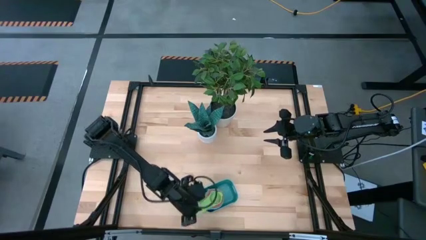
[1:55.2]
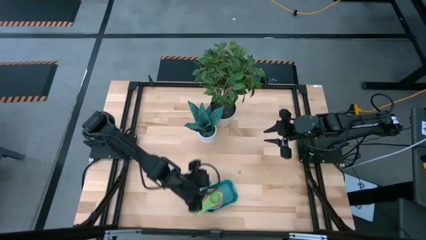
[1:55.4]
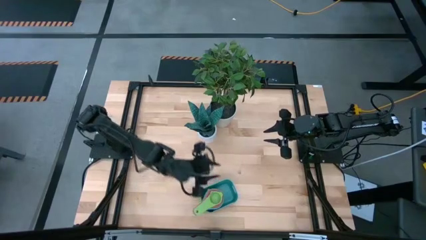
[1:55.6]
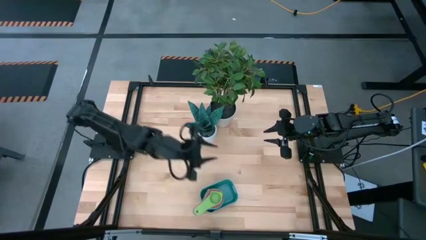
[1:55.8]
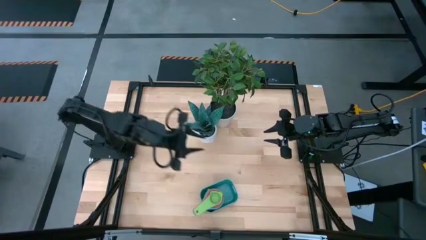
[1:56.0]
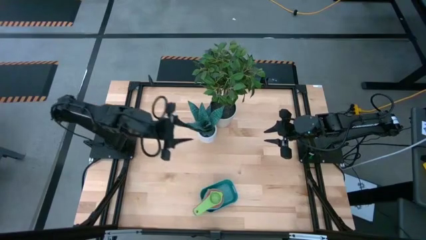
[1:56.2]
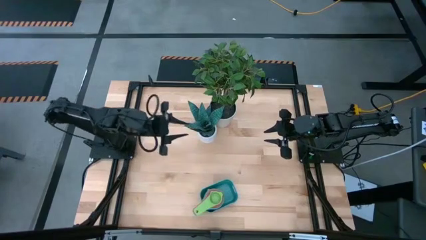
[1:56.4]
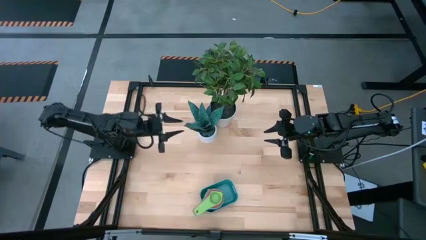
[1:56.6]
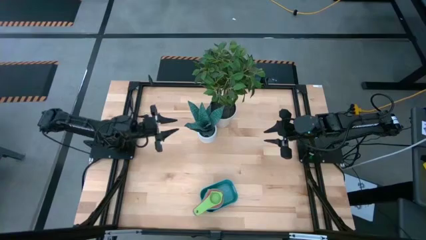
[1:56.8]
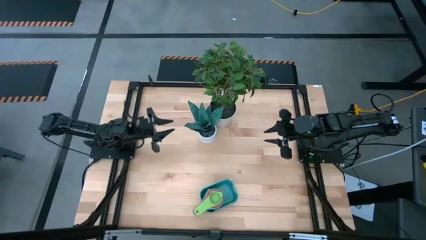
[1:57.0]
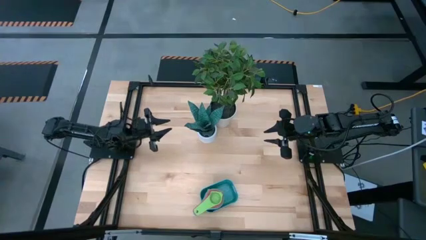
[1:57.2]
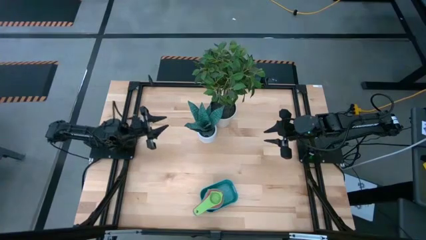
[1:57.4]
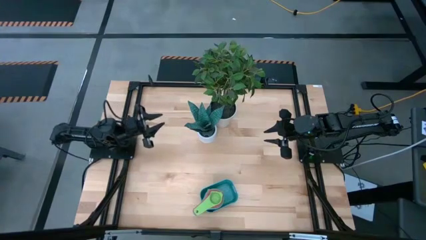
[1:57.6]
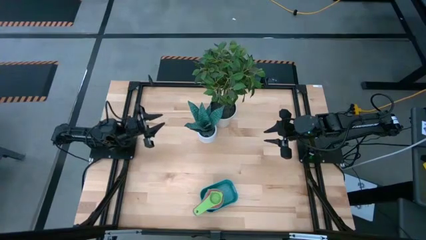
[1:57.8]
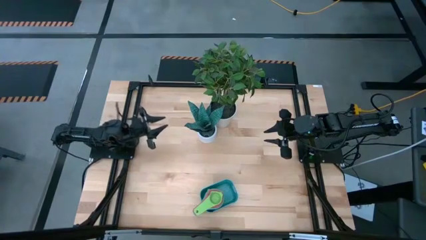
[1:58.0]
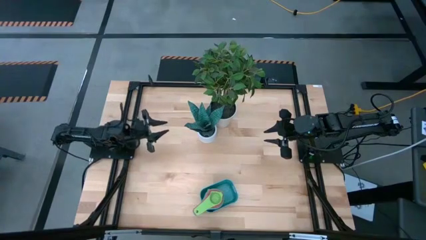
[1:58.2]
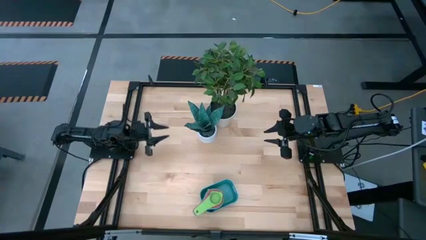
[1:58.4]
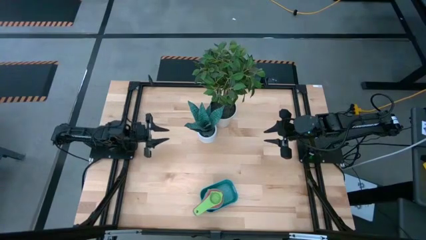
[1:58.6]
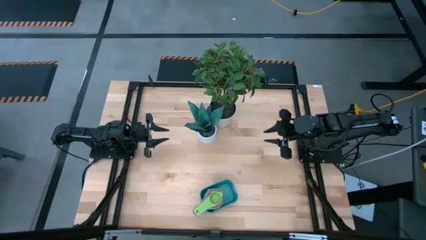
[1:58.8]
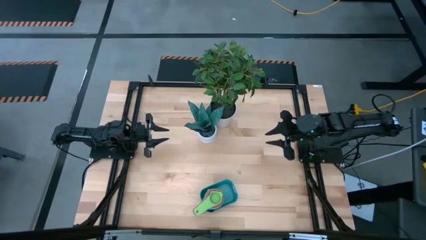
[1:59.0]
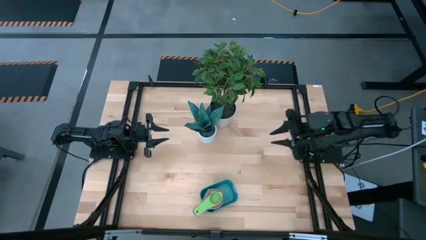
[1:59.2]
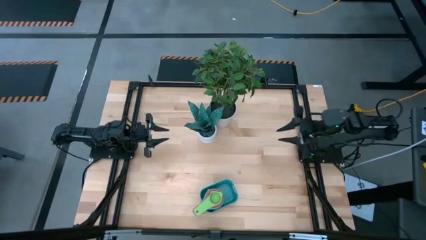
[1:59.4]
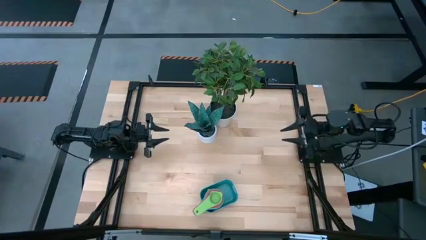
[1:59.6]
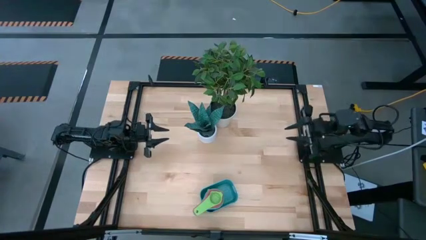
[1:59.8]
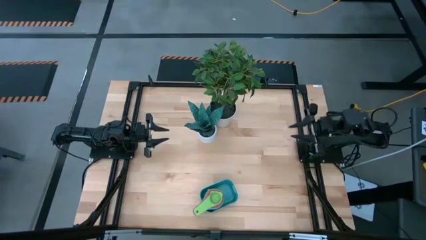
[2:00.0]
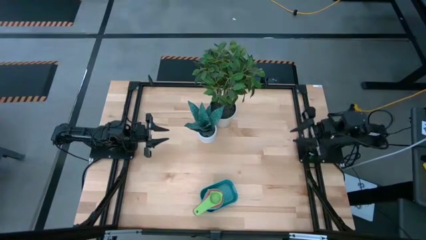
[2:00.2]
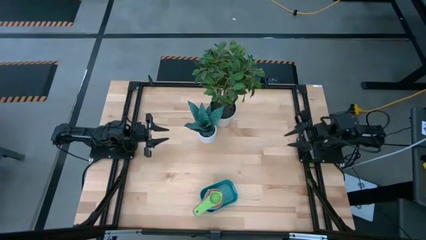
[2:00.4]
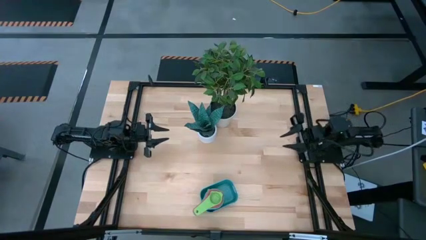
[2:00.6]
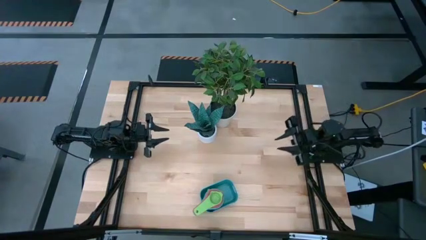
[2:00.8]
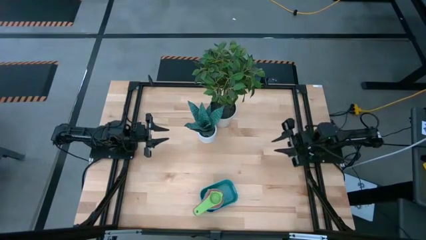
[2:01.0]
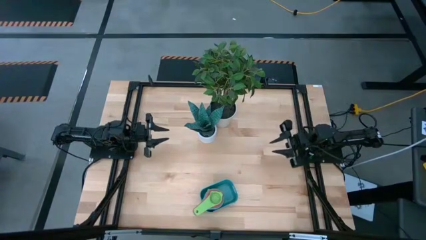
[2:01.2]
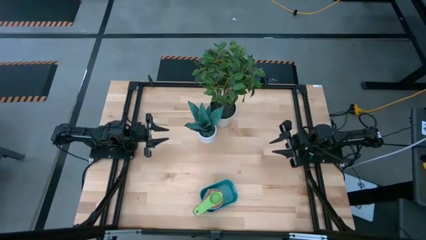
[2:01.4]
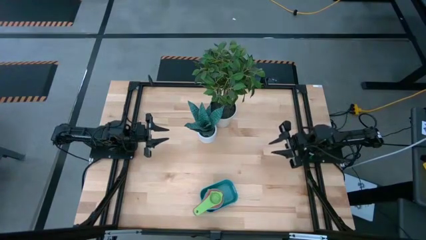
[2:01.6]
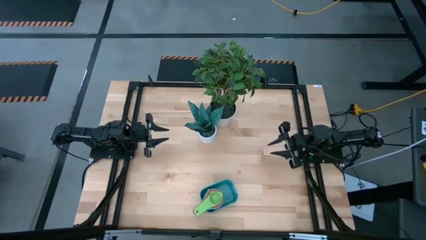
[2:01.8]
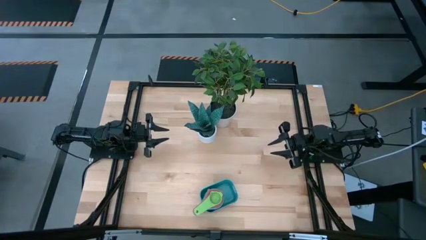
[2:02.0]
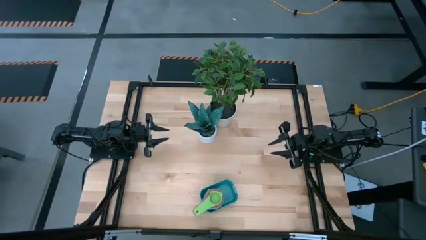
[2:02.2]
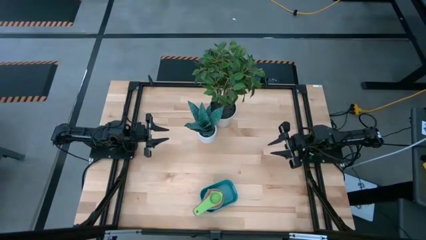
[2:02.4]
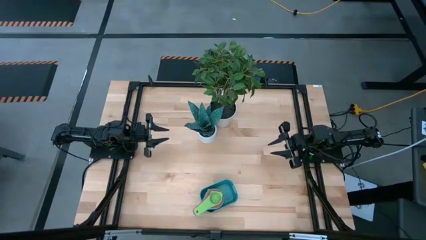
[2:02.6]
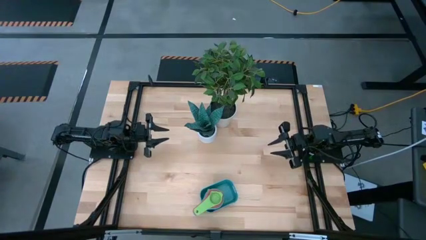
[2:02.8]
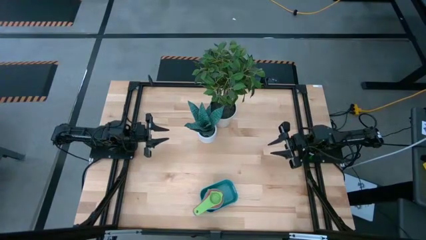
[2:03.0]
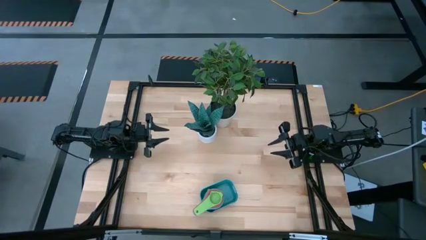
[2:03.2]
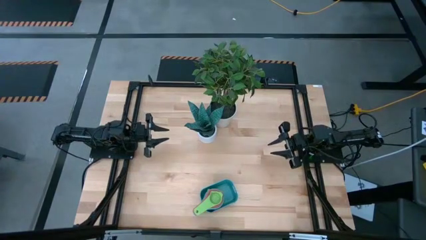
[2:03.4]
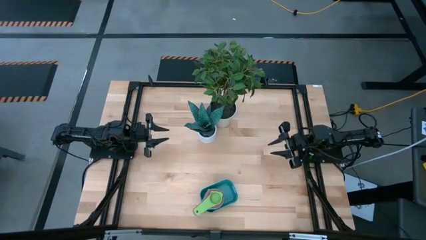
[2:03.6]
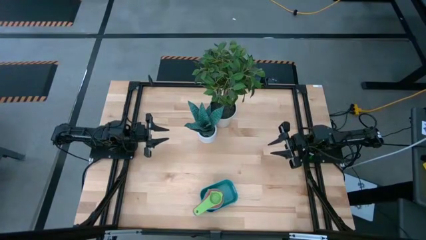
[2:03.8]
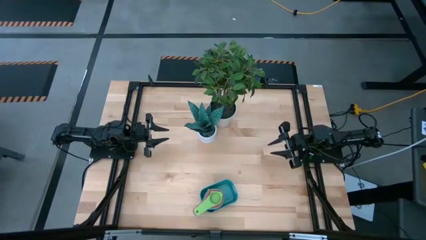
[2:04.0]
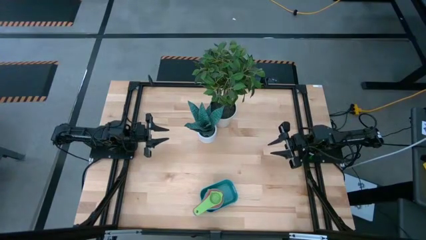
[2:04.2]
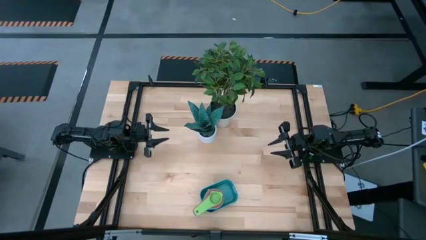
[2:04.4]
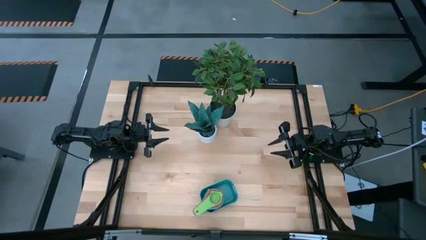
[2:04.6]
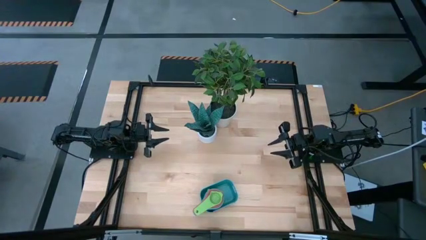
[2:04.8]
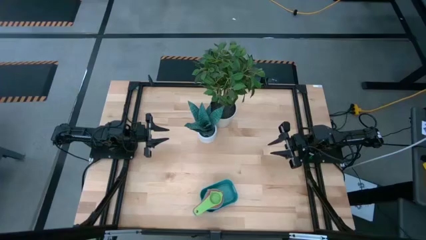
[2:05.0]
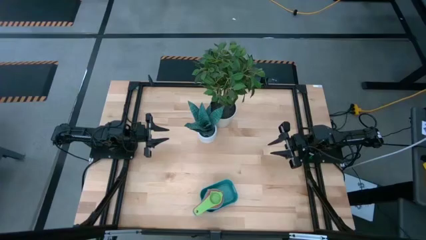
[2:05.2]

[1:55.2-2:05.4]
Task: Nest measuring cups in basket
Return to Home Position
